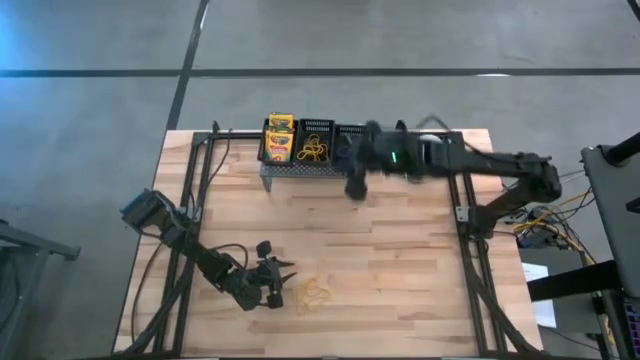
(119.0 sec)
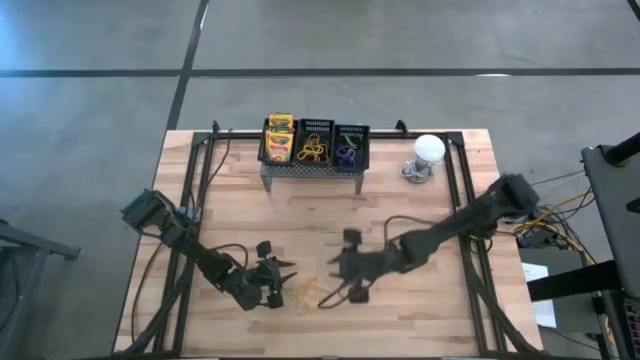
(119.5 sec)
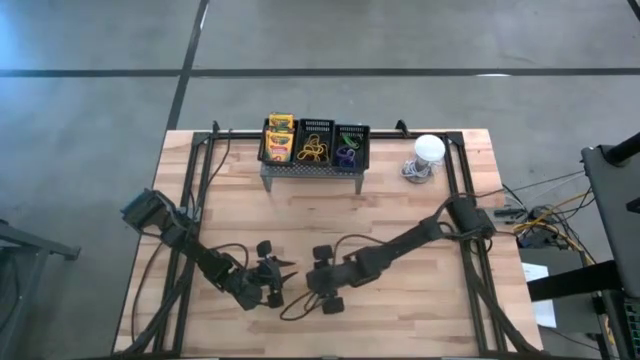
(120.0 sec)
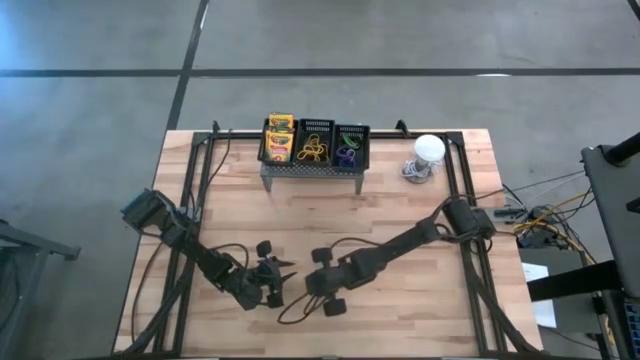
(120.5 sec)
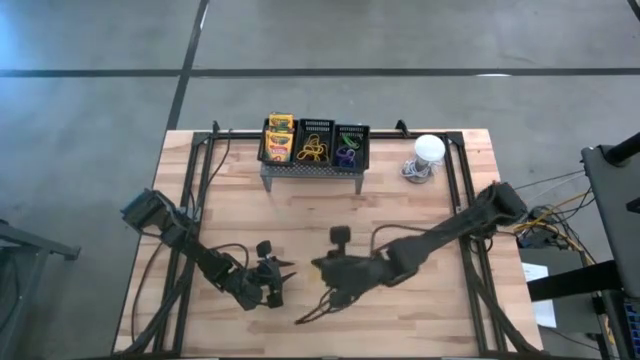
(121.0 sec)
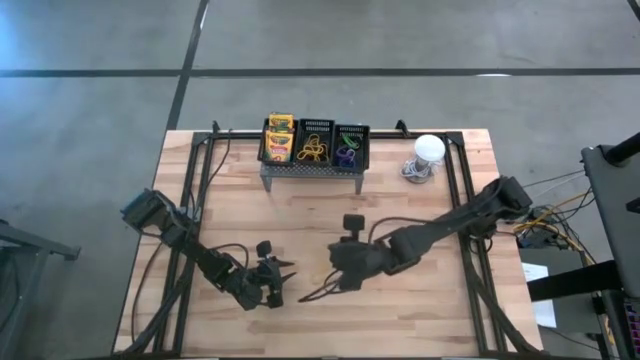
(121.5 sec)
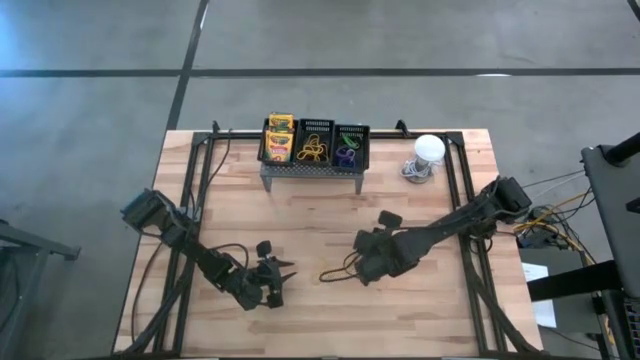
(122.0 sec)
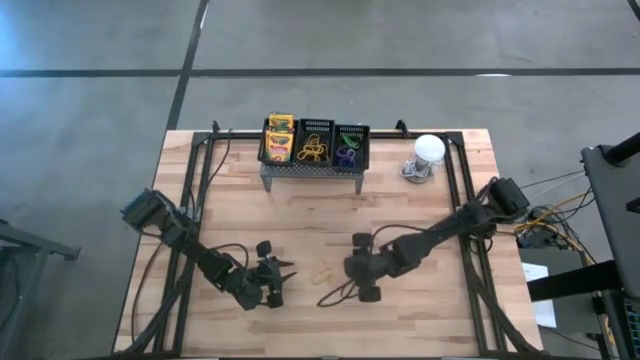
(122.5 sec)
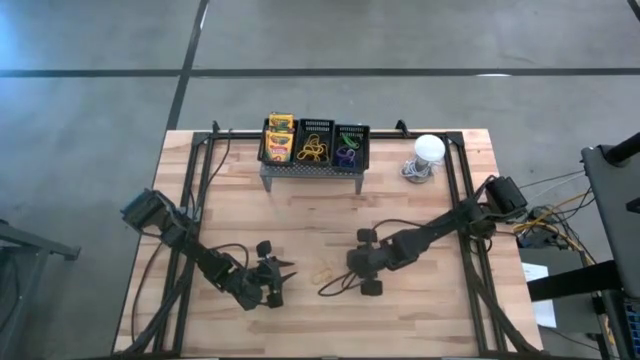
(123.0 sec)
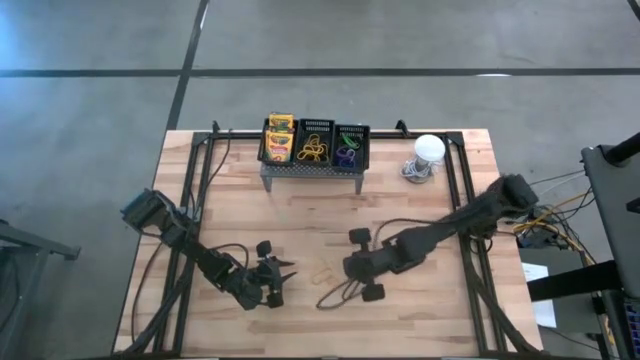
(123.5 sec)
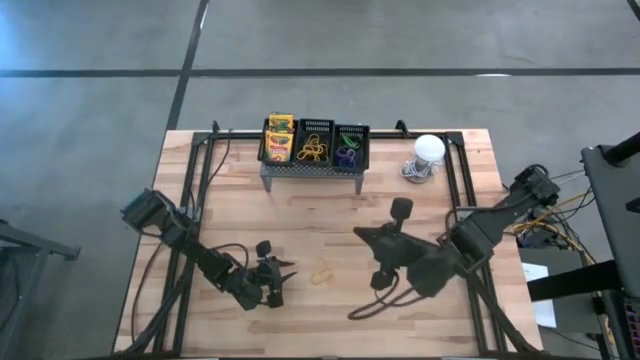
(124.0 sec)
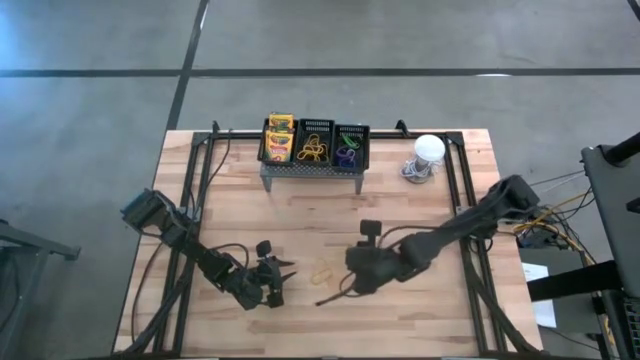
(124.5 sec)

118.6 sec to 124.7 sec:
Task: Pick & Place Office Desk Supplies
Put the yellow rubber band into the middle black bin on the shelf

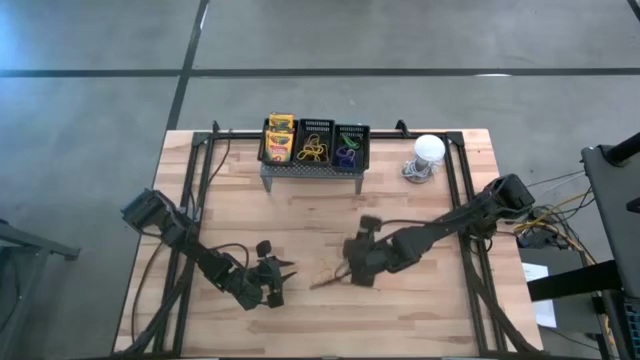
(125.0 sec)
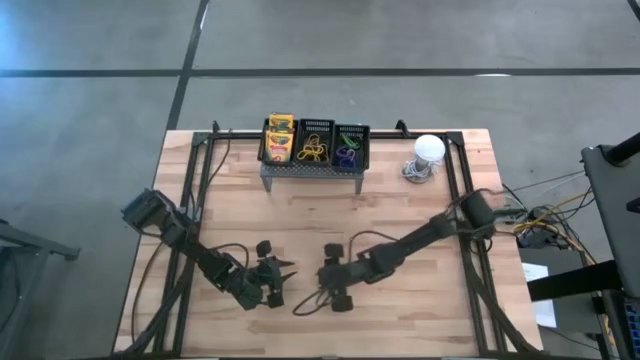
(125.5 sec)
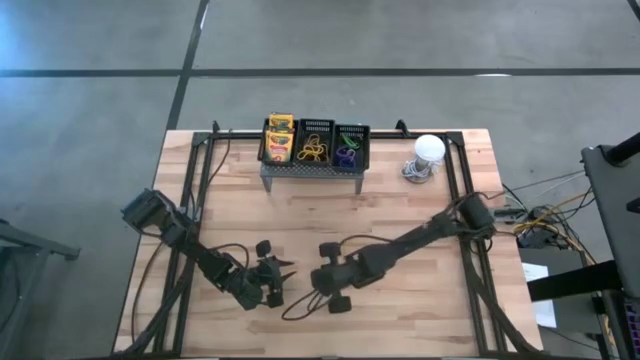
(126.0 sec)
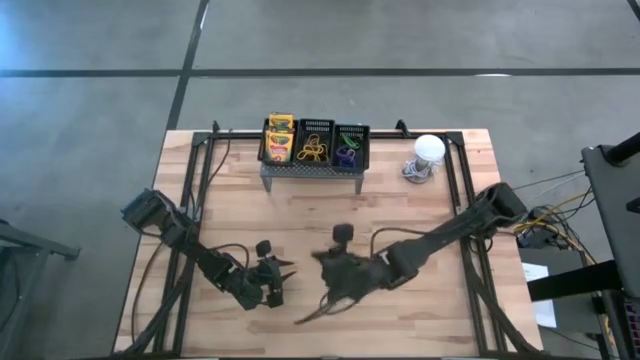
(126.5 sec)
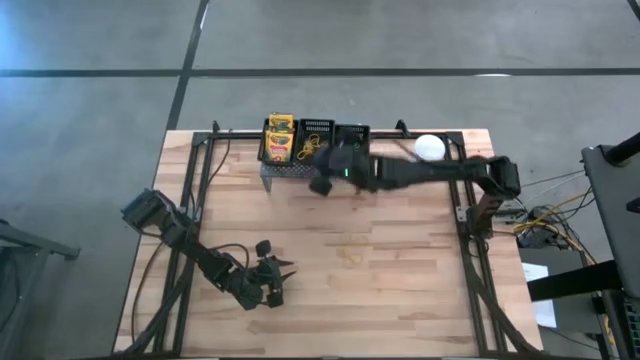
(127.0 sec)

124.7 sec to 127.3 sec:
Put the yellow rubber band into the middle black bin on the shelf

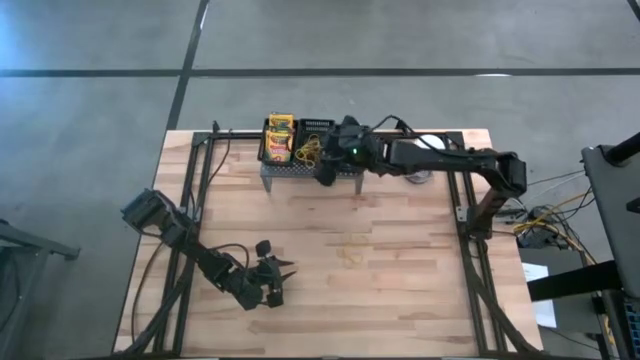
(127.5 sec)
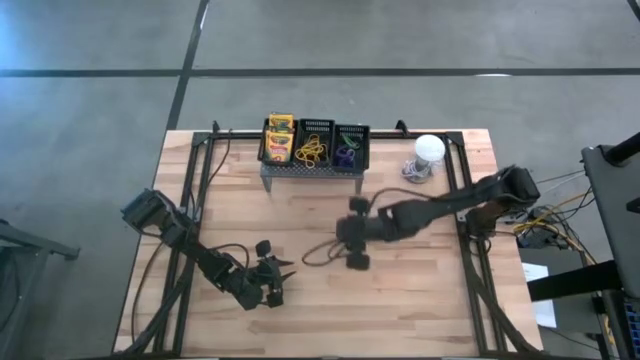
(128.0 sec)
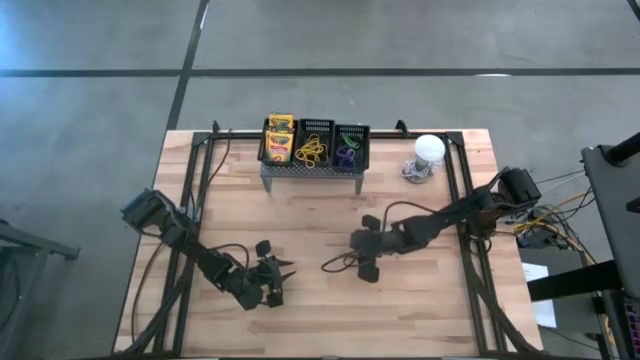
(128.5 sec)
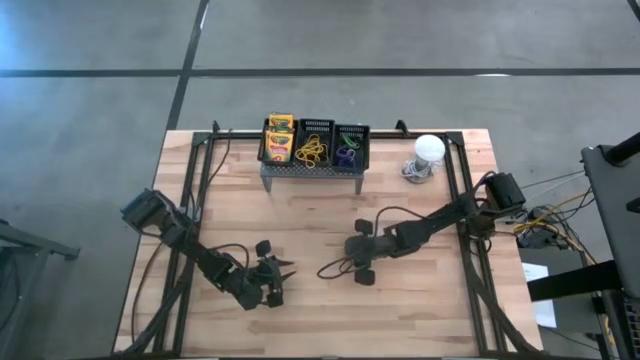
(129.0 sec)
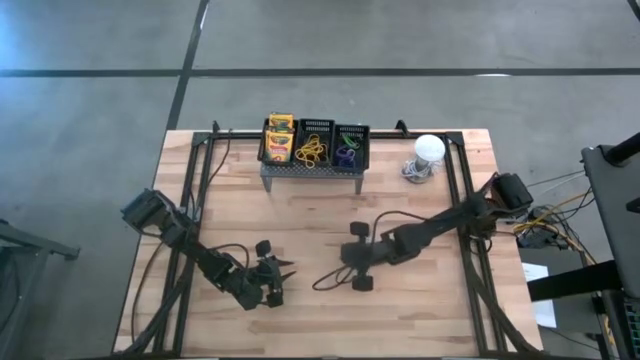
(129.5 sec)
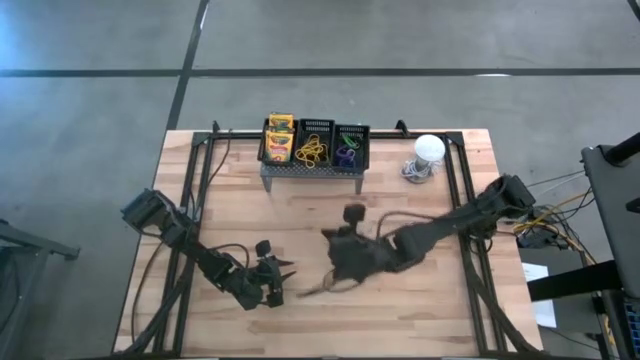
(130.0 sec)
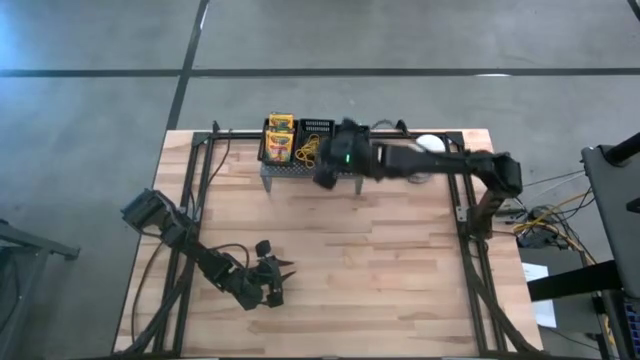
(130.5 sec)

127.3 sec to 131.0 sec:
Put the yellow rubber band into the middle black bin on the shelf

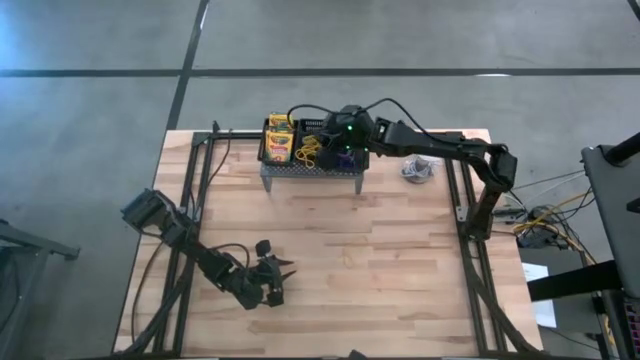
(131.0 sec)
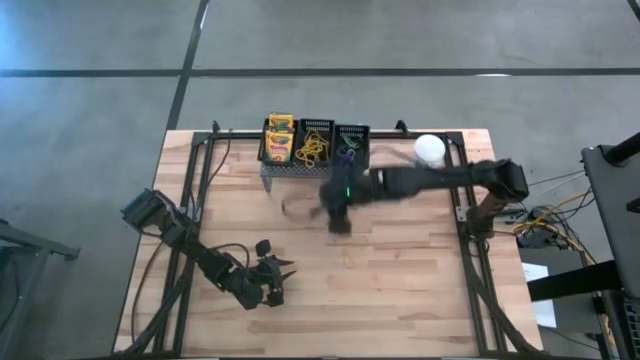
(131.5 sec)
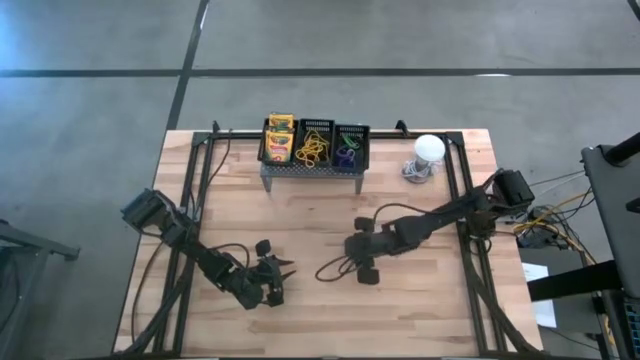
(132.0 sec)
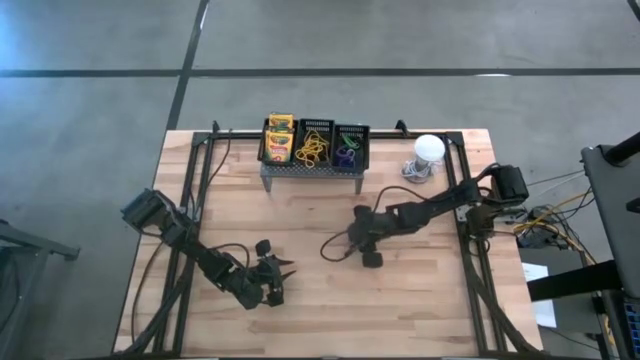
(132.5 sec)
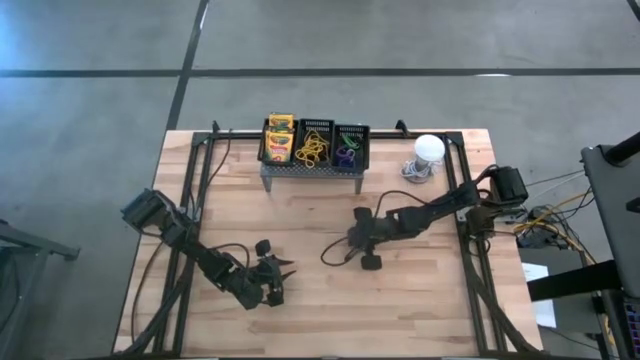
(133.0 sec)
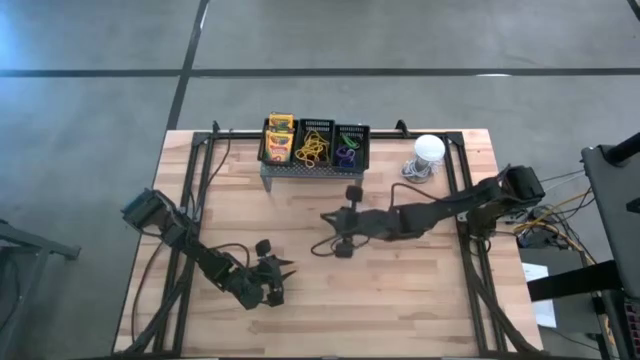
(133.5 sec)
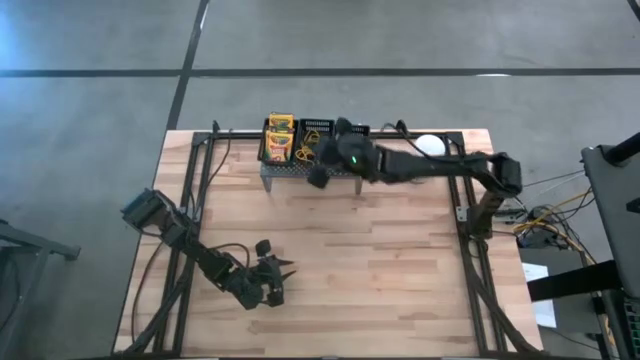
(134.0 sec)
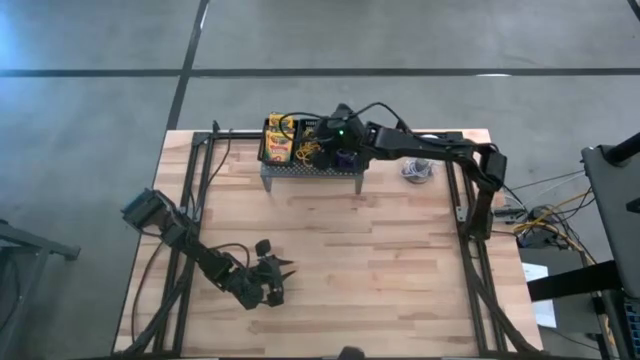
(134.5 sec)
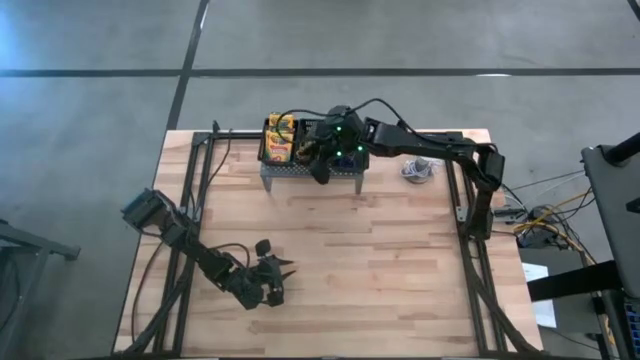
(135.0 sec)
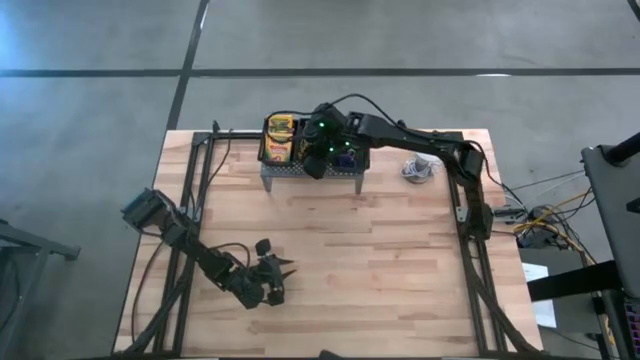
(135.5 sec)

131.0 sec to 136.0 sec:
Put the yellow rubber band into the middle black bin on the shelf

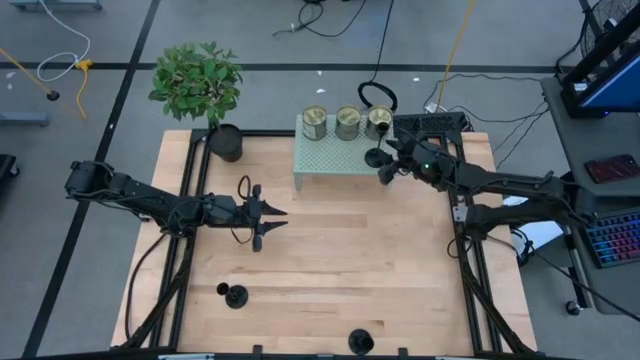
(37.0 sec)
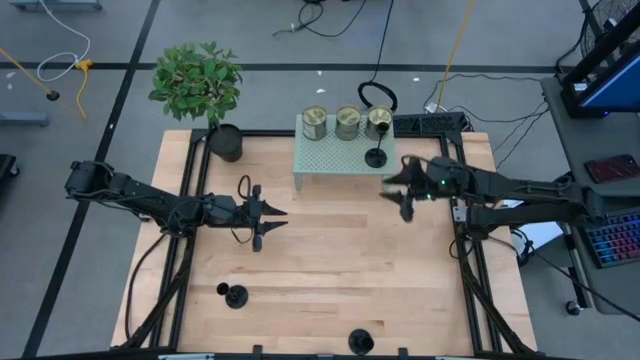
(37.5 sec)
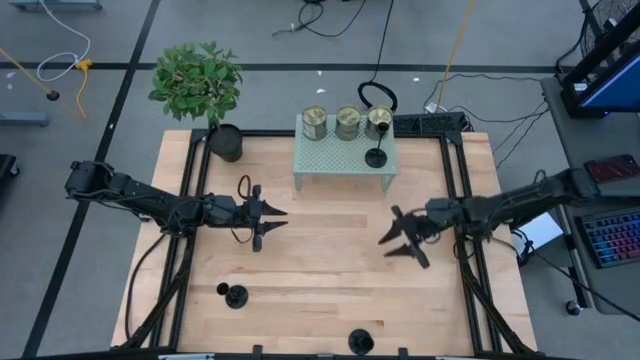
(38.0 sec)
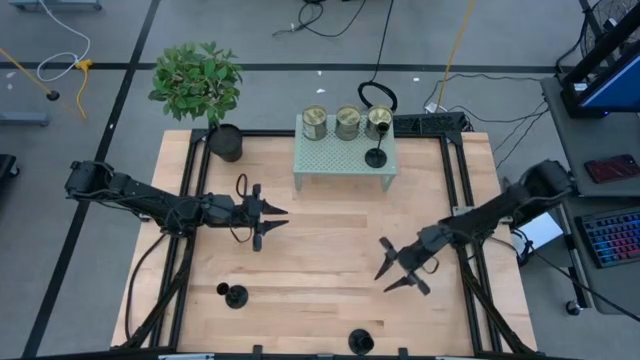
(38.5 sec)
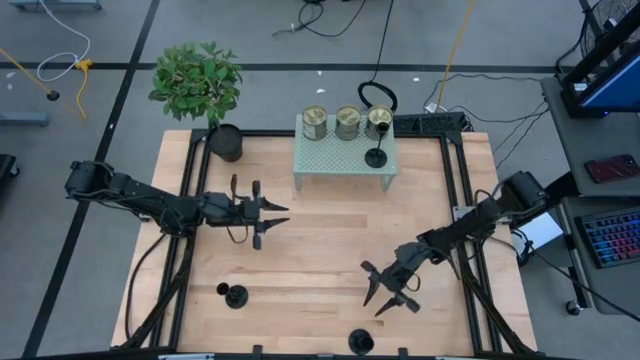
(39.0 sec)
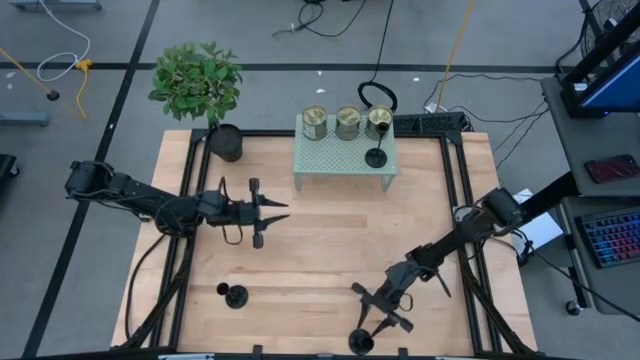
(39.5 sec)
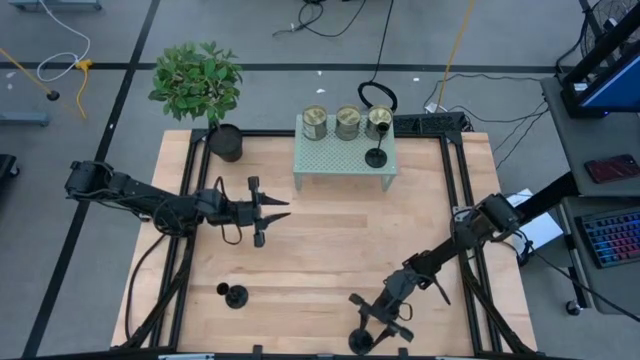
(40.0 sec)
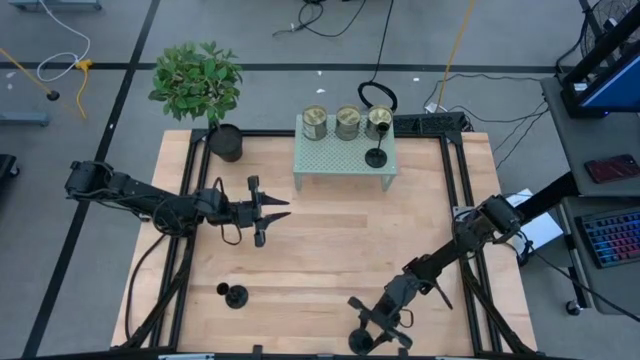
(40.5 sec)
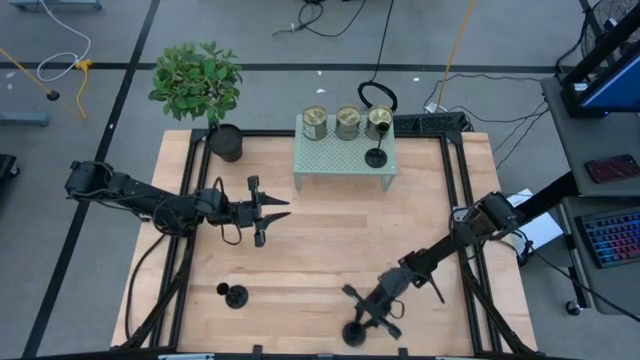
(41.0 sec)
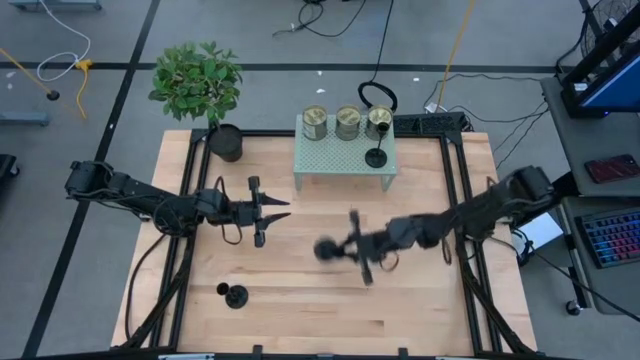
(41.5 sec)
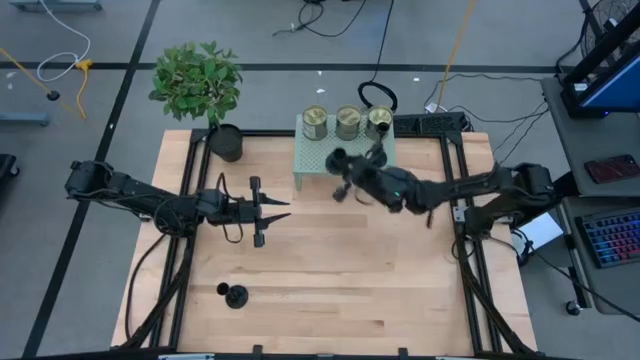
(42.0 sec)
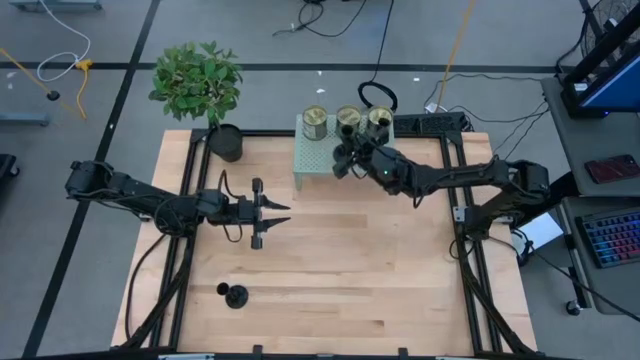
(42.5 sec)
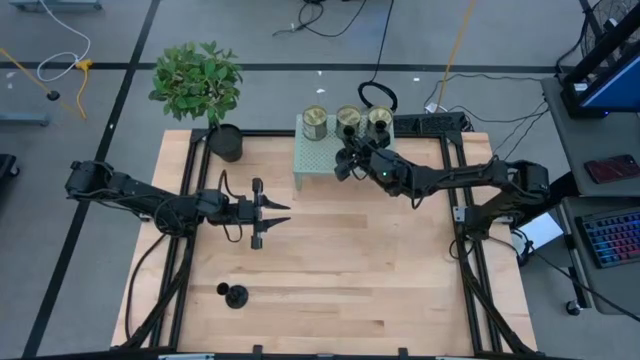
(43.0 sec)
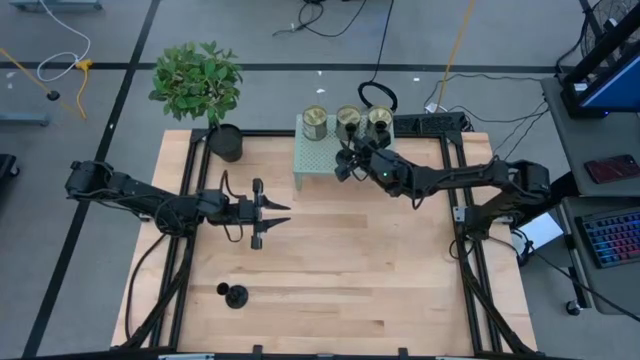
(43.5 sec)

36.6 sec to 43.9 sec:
Task: Pick & Place candle stick holders
Put the bottom black candle holder on the shelf aligned with the other black candle holder
